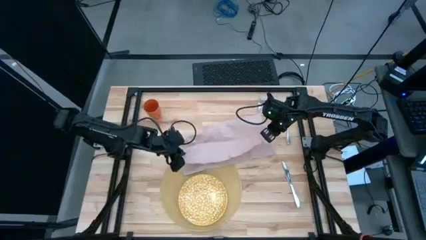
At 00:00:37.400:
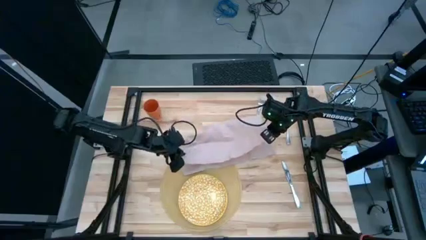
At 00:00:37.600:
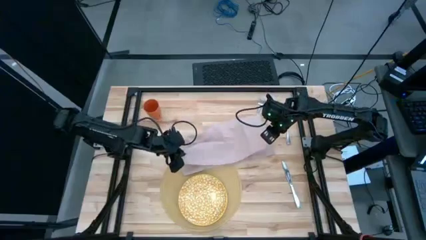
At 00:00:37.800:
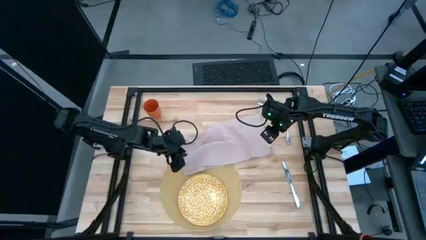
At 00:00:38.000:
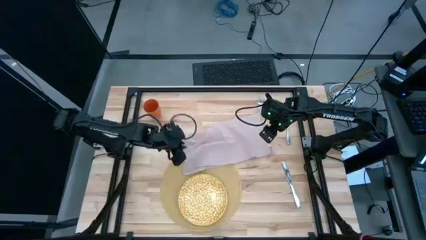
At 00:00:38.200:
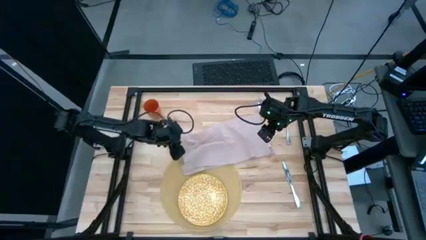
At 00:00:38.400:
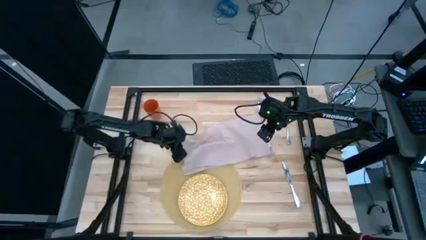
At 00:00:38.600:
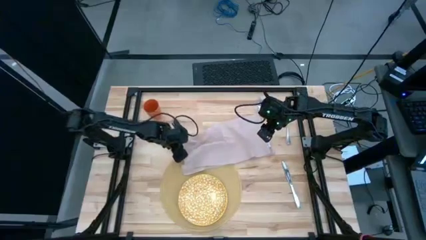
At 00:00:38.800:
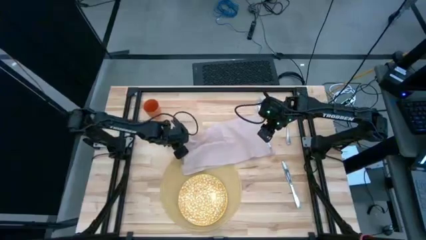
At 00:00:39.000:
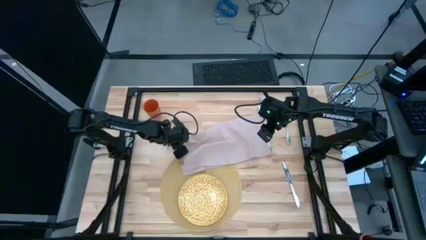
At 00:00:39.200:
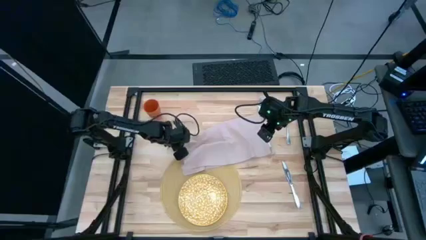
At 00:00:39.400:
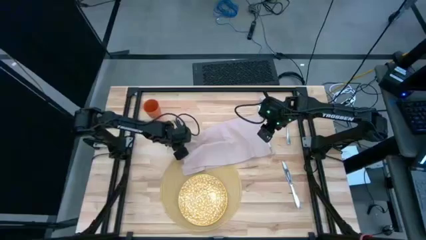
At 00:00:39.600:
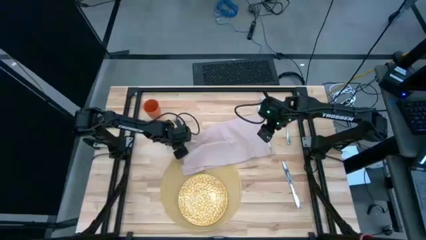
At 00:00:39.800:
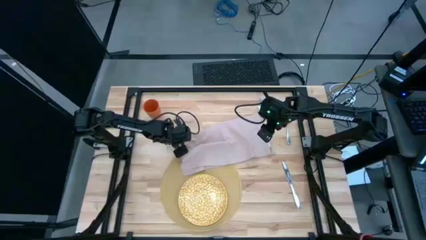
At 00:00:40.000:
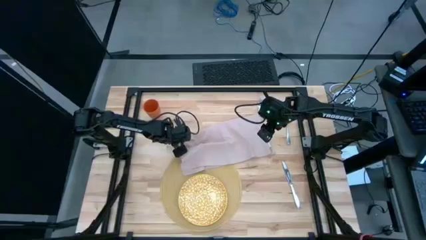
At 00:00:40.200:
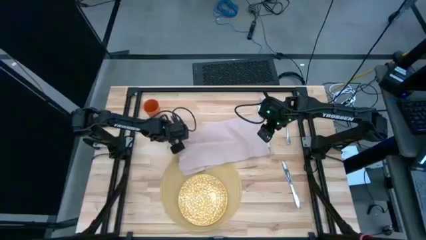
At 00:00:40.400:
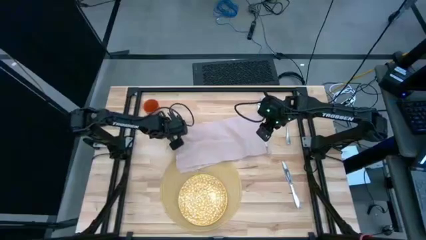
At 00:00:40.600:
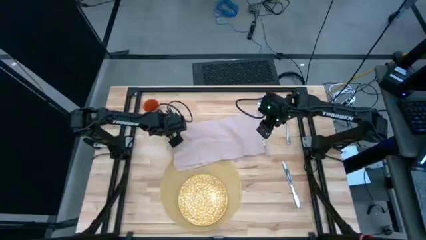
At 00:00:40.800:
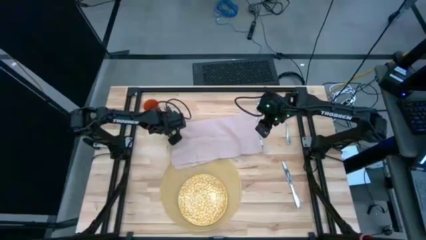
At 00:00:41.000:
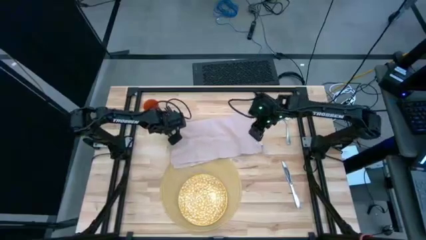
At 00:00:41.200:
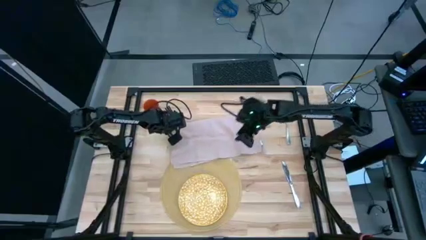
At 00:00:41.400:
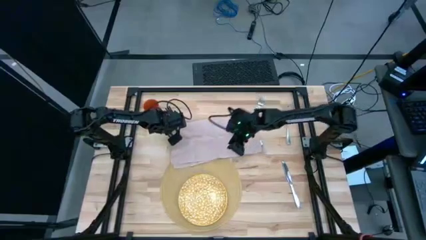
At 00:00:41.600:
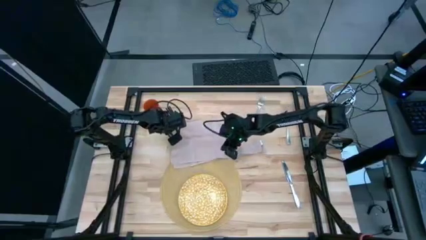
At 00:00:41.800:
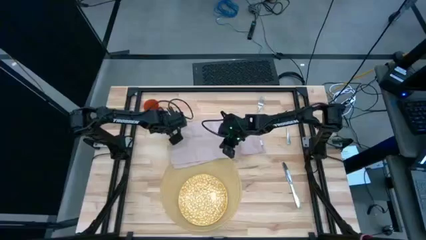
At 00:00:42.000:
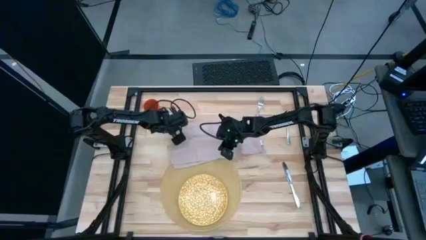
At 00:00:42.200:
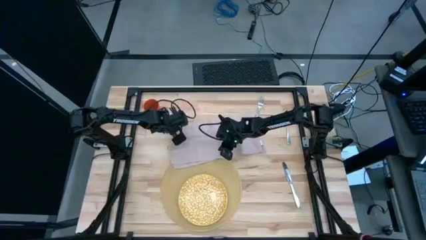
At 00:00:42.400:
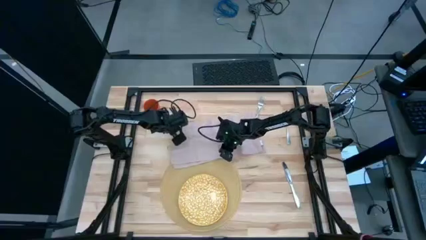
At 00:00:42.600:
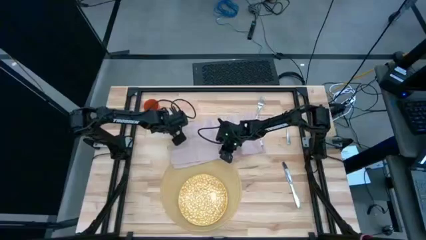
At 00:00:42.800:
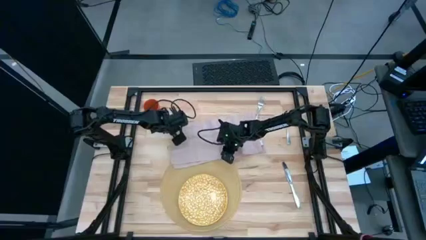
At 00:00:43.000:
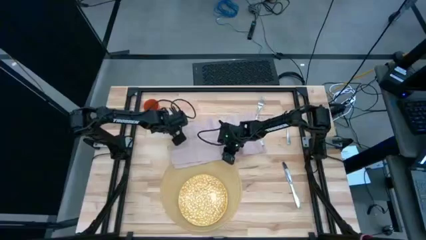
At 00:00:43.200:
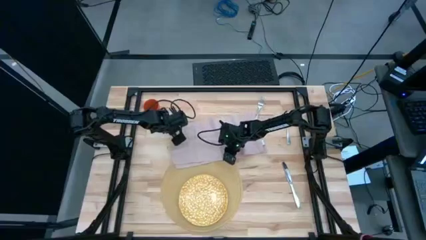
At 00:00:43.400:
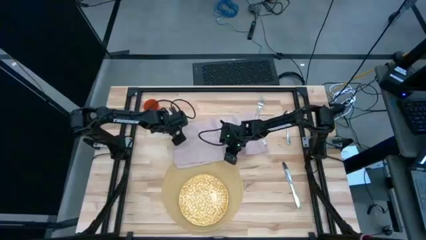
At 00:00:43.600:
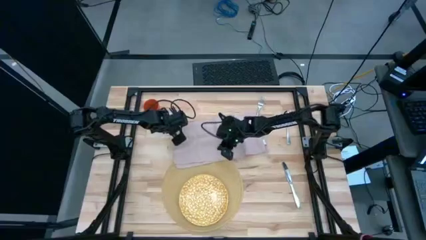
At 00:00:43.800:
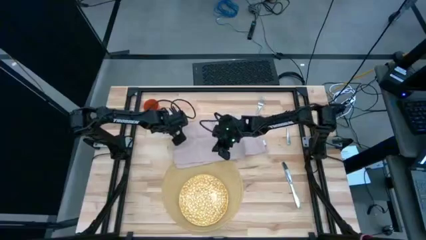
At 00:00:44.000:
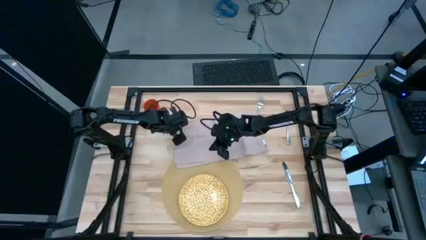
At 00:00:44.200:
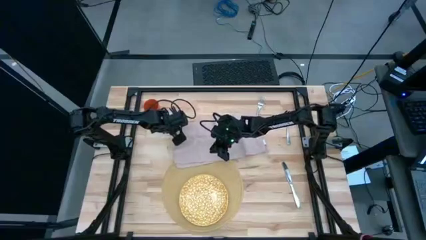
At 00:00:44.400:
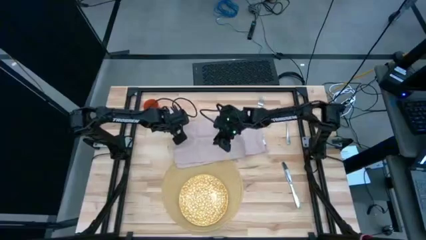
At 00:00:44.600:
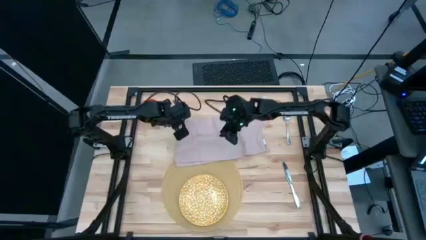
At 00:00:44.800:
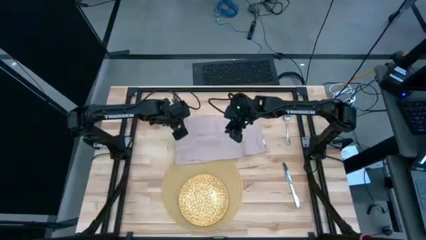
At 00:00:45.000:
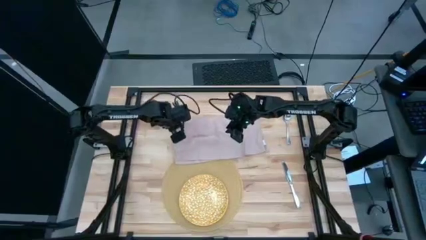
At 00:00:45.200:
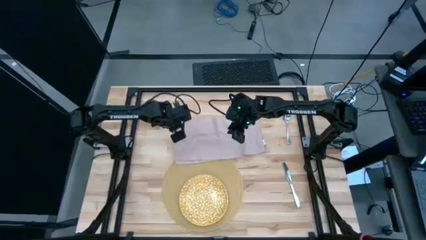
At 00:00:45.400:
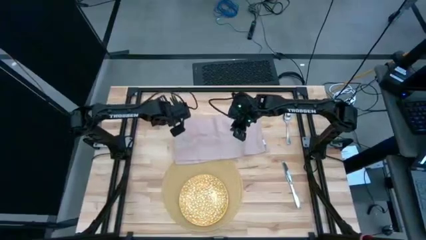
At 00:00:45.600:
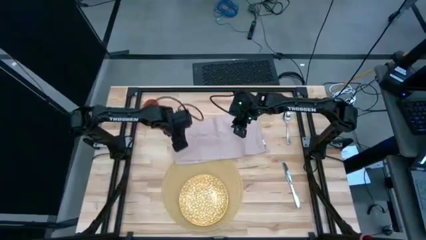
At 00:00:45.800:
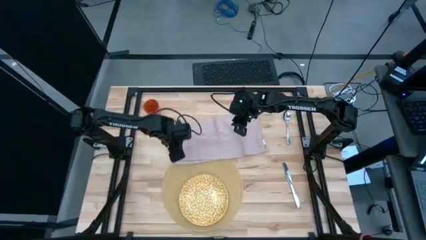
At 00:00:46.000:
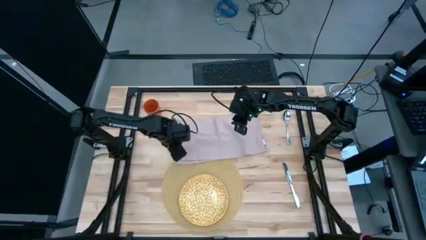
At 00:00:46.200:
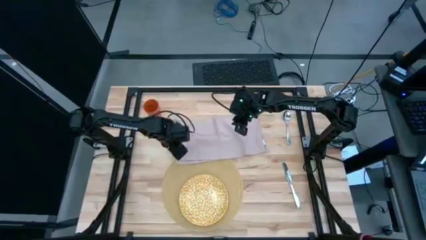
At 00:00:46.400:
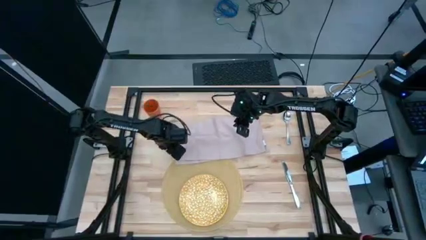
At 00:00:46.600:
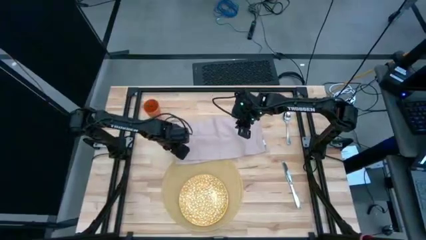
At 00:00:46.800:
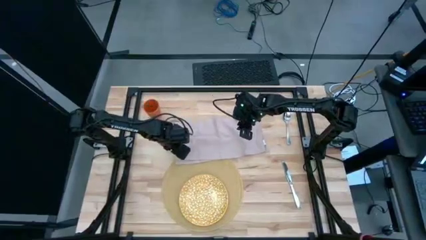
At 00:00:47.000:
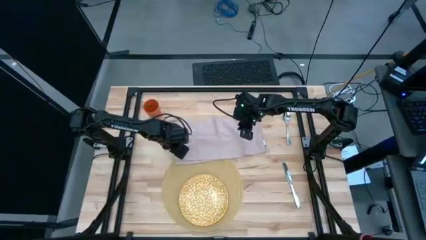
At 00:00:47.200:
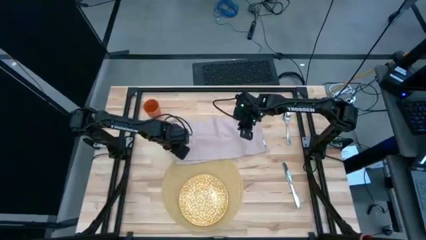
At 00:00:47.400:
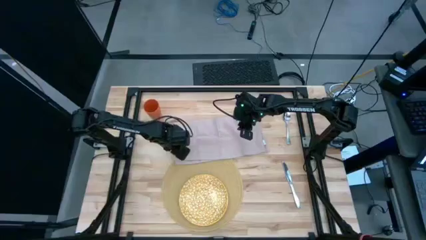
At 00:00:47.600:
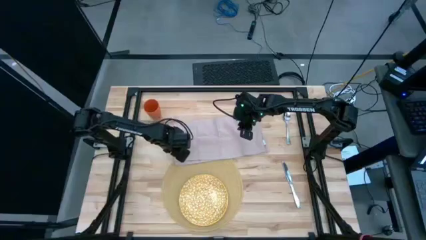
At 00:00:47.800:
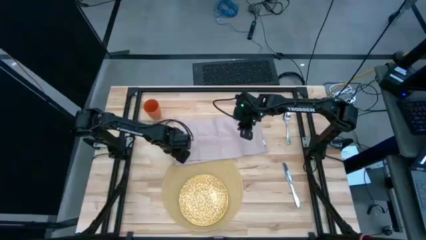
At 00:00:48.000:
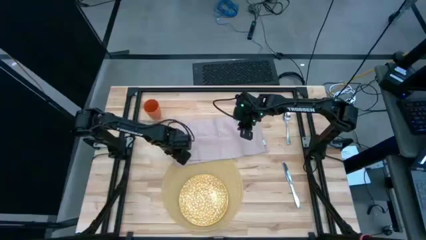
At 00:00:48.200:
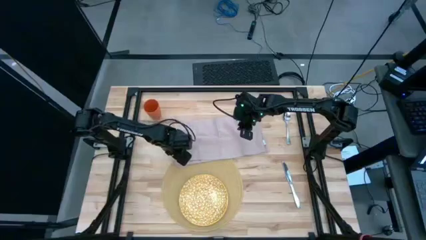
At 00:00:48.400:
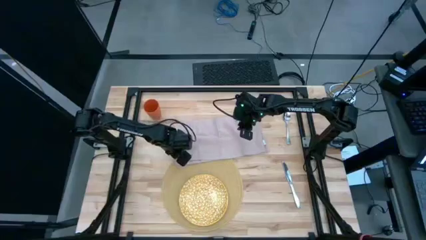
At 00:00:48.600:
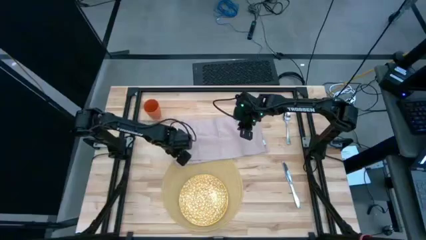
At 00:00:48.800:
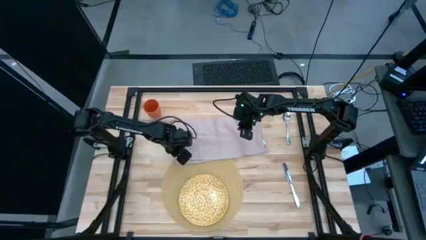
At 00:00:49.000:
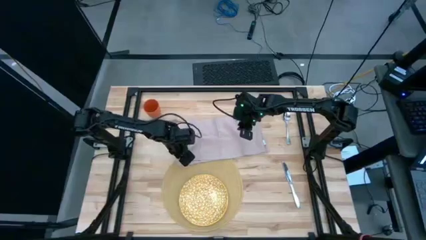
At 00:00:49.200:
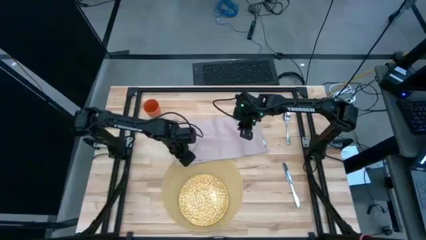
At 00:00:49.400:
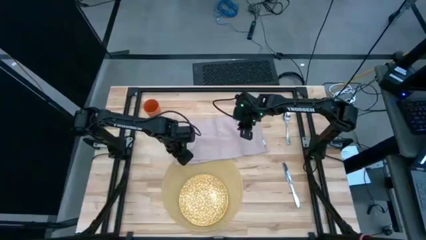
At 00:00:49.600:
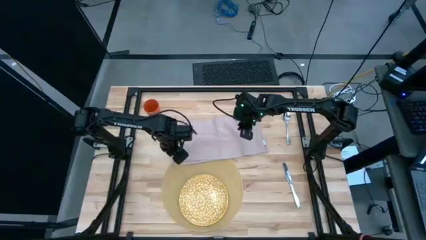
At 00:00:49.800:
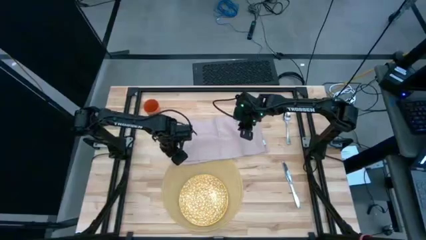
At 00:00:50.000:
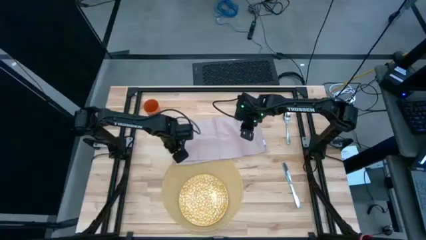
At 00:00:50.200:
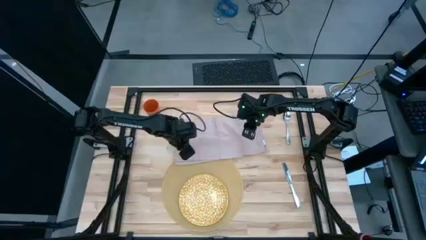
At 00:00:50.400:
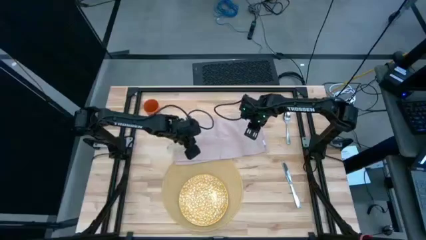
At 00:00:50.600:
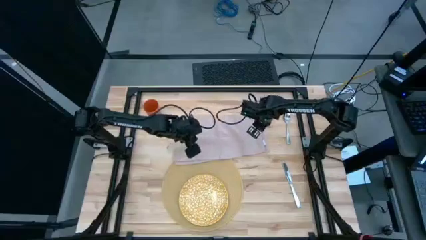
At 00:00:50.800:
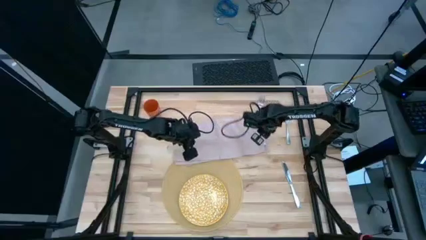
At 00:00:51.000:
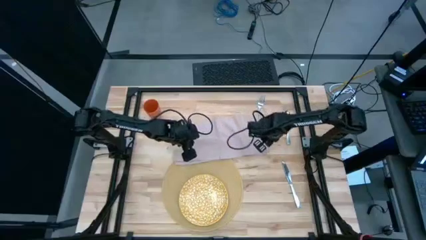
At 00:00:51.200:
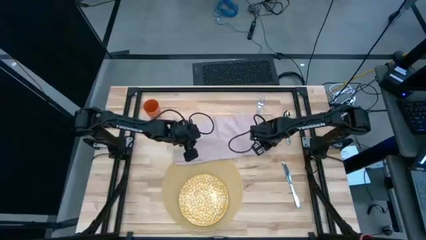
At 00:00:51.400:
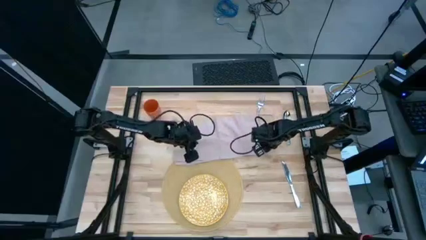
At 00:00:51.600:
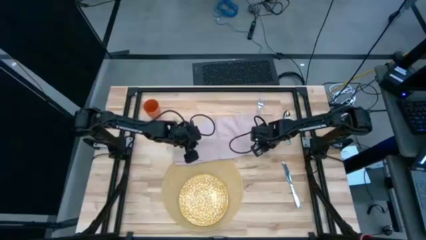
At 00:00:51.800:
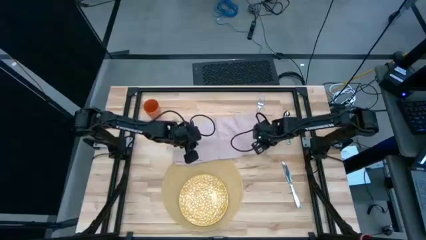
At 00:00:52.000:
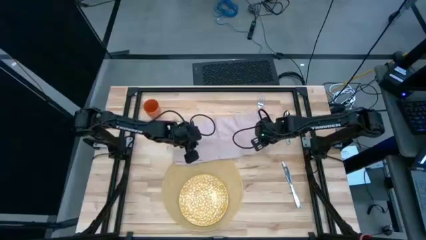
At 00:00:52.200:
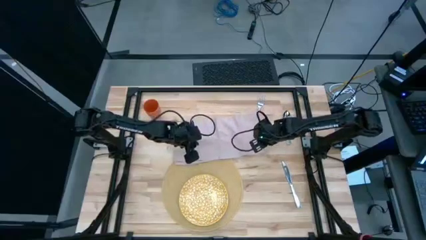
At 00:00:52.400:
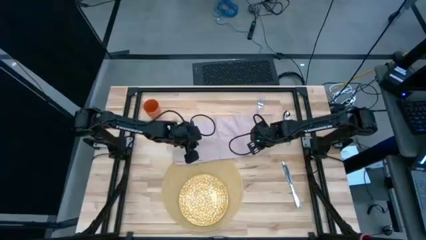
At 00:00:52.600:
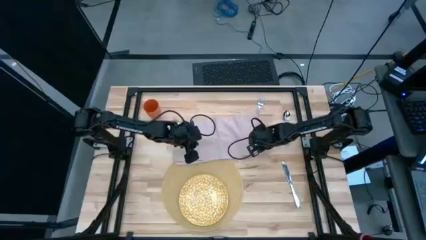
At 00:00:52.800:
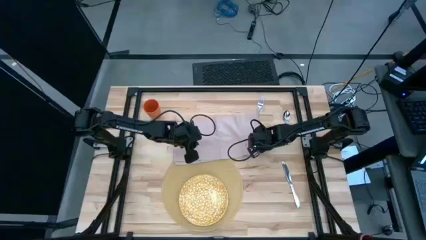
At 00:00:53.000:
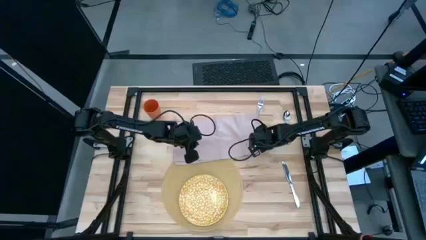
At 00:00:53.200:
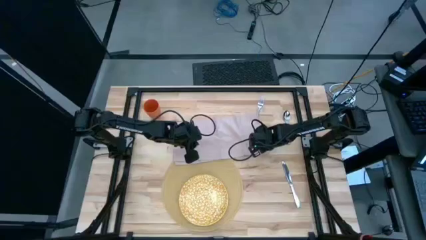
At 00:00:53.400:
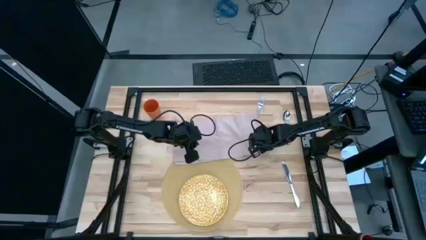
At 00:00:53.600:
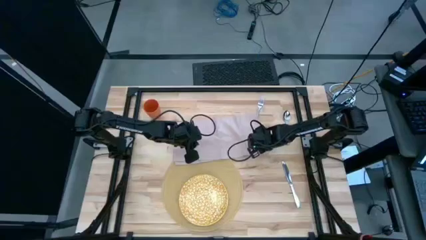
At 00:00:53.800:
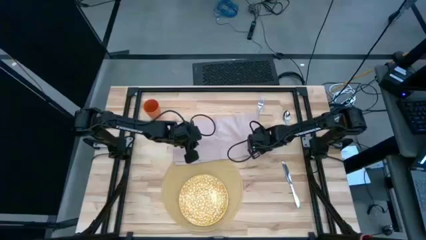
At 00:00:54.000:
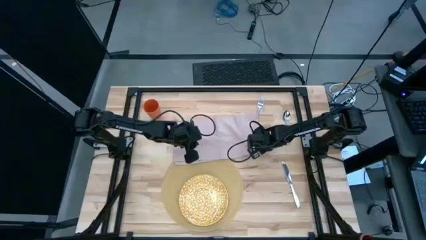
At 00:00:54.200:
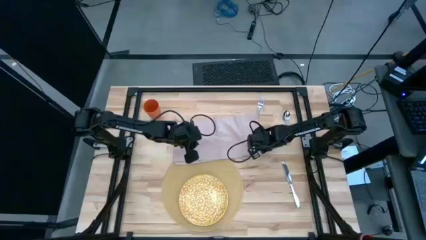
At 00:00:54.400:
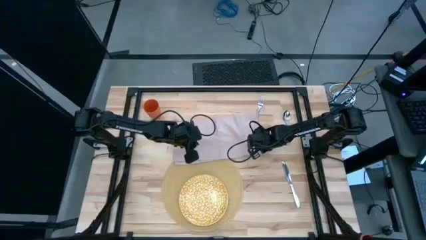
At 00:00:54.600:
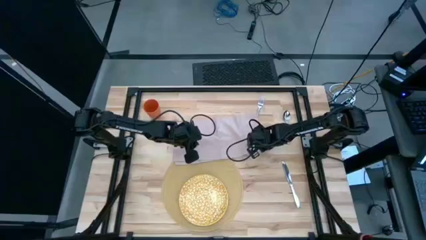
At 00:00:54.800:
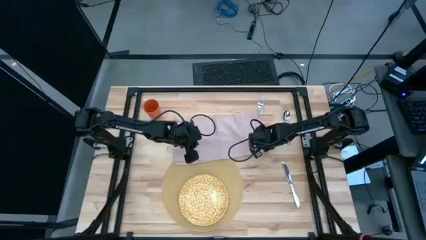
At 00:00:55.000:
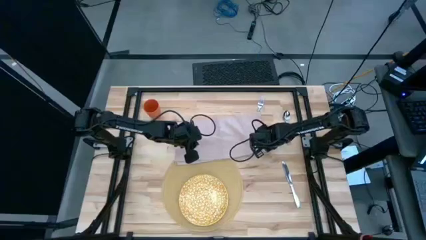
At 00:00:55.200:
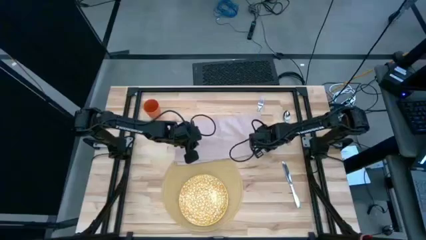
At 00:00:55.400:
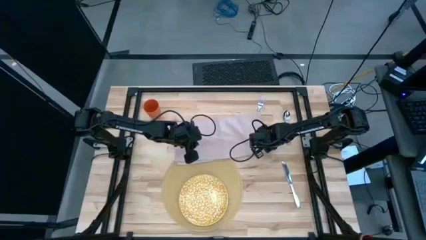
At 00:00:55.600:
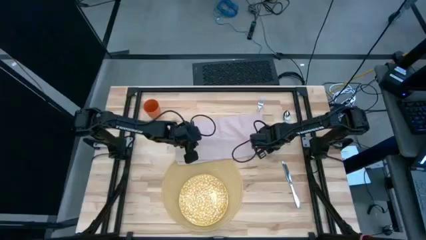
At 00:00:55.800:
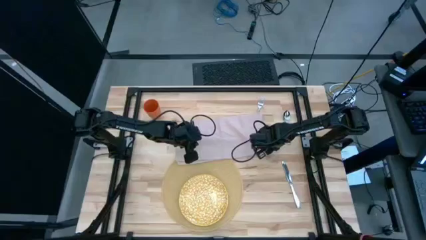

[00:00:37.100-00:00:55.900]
Task: Set table place
Fold the light orange napkin on the table
